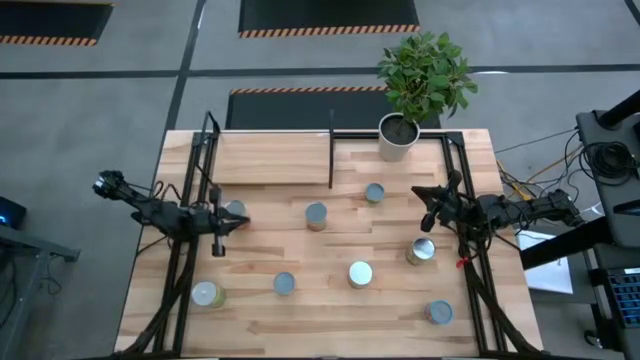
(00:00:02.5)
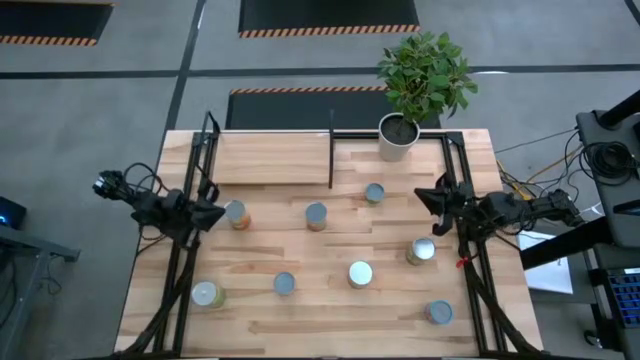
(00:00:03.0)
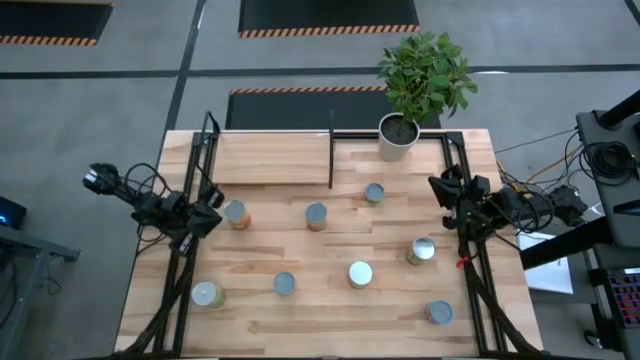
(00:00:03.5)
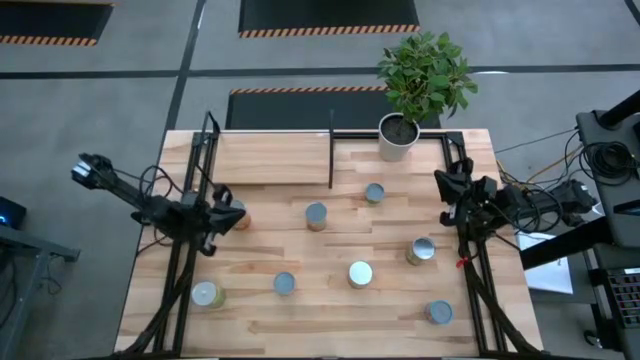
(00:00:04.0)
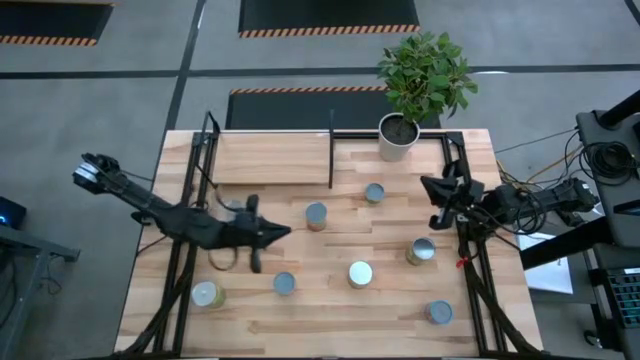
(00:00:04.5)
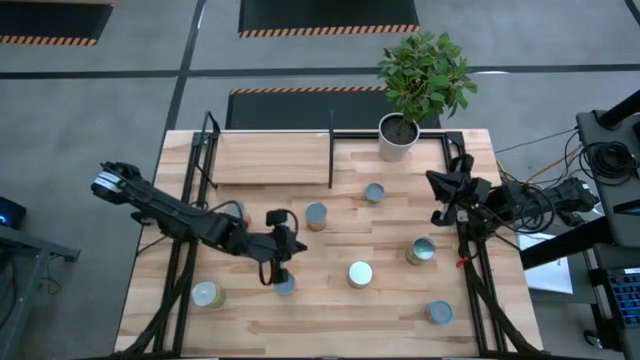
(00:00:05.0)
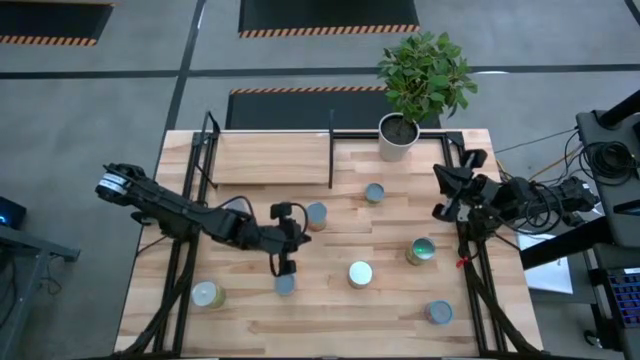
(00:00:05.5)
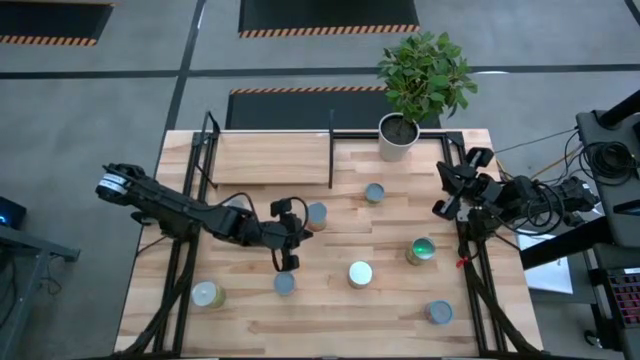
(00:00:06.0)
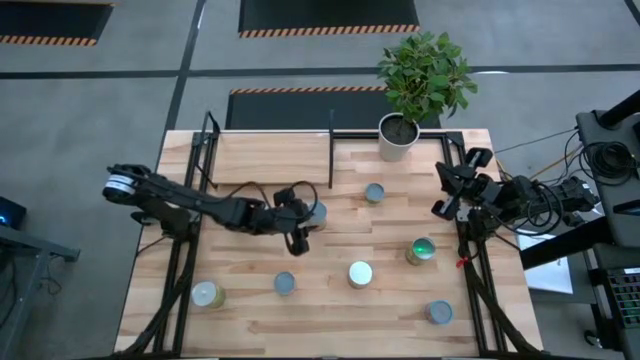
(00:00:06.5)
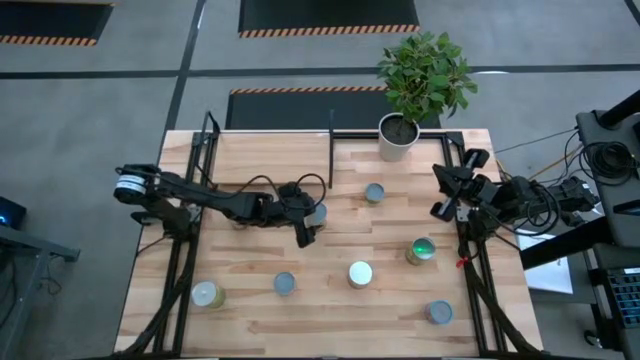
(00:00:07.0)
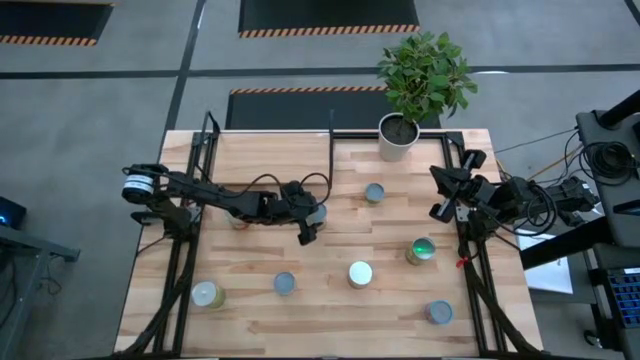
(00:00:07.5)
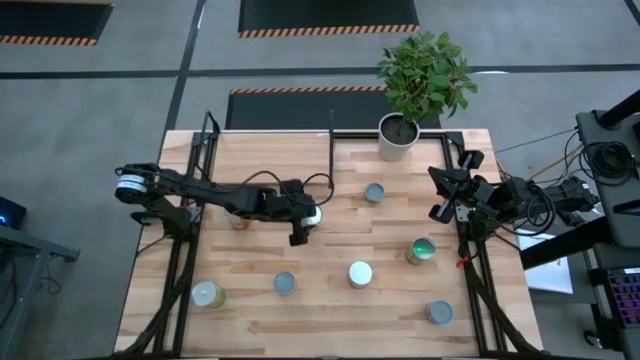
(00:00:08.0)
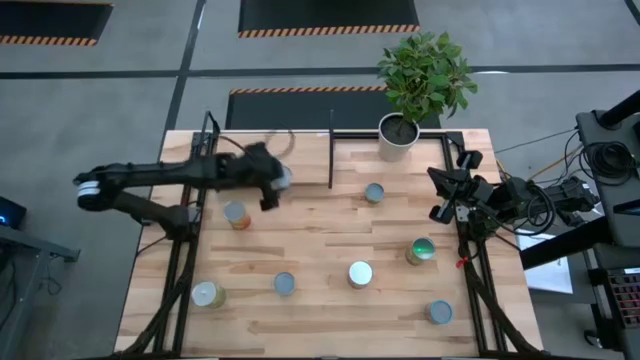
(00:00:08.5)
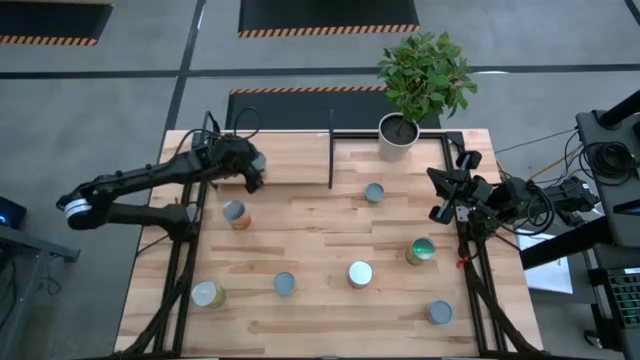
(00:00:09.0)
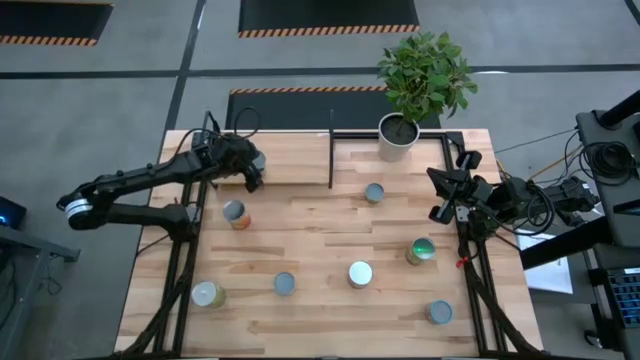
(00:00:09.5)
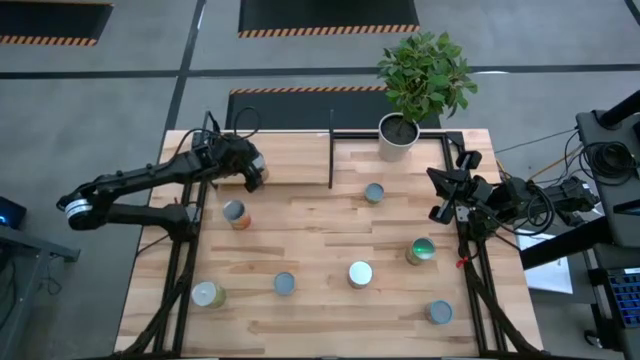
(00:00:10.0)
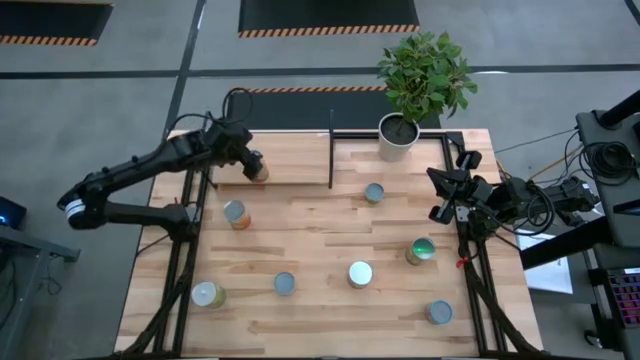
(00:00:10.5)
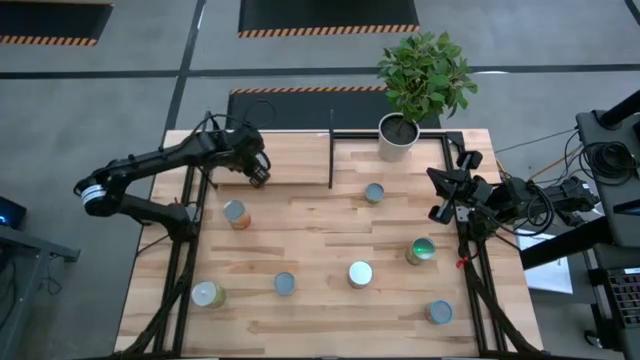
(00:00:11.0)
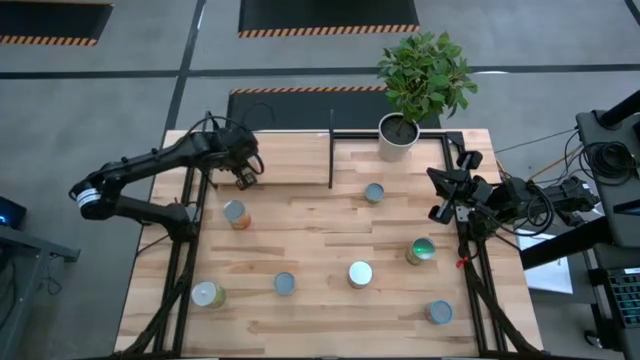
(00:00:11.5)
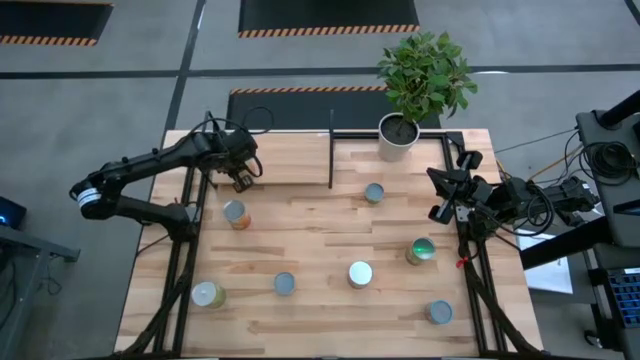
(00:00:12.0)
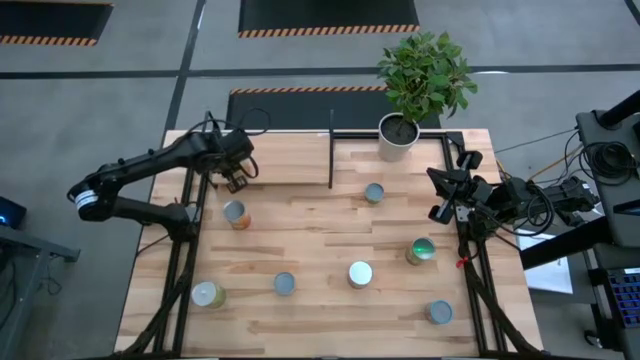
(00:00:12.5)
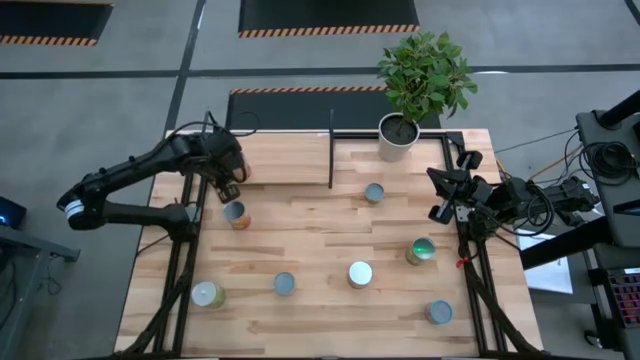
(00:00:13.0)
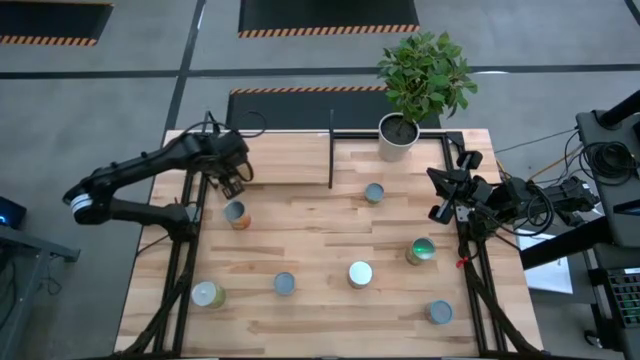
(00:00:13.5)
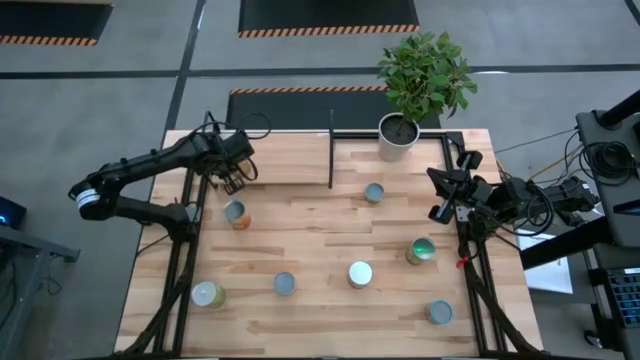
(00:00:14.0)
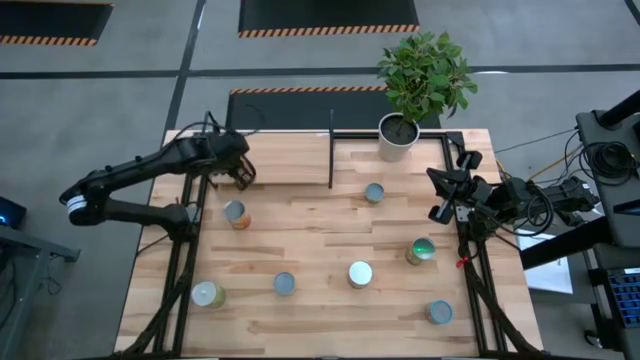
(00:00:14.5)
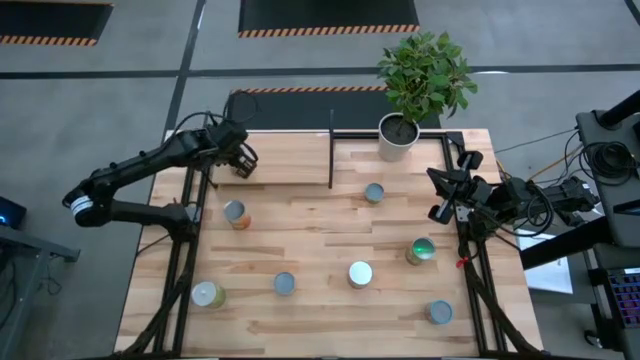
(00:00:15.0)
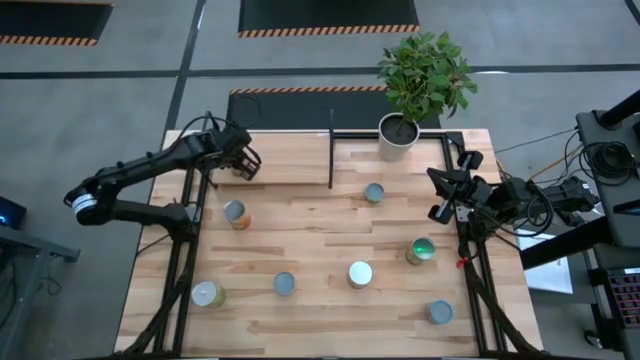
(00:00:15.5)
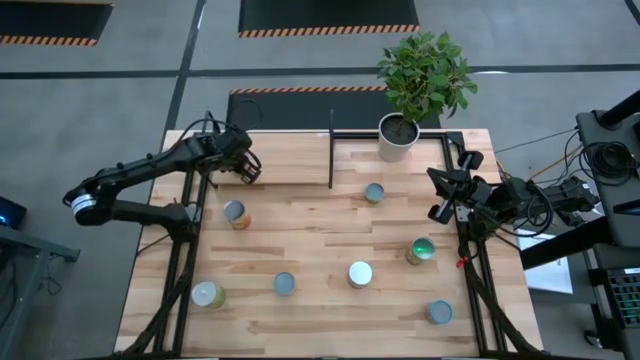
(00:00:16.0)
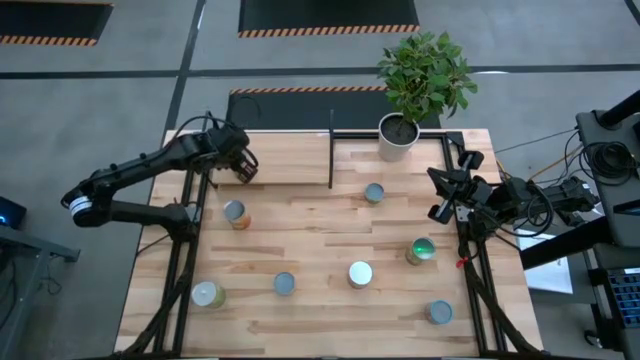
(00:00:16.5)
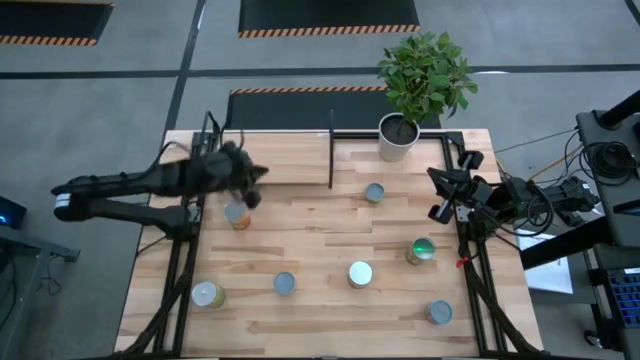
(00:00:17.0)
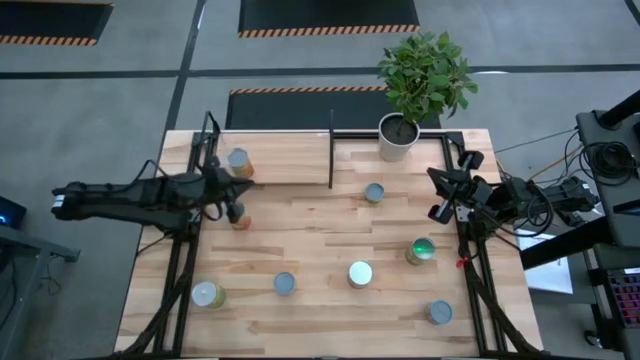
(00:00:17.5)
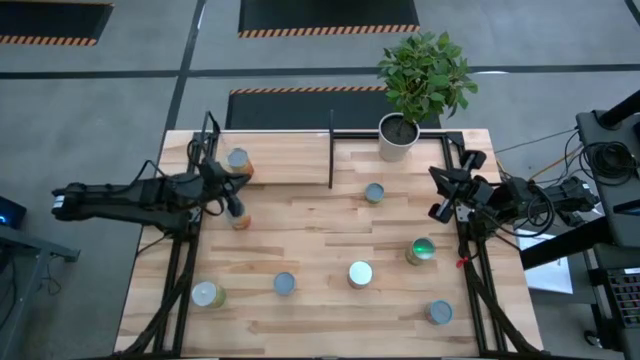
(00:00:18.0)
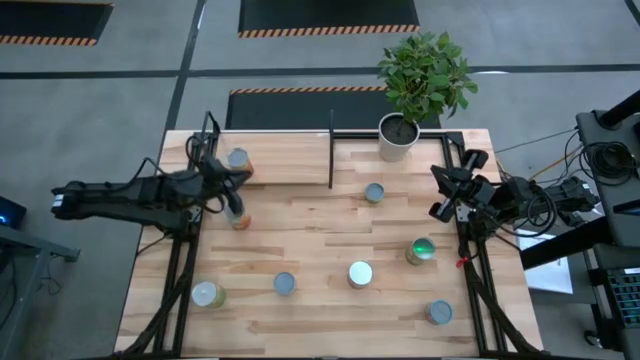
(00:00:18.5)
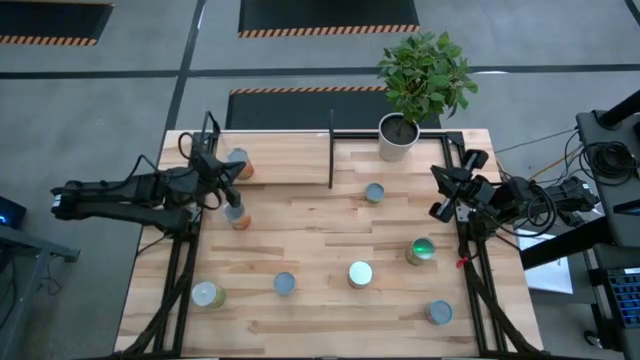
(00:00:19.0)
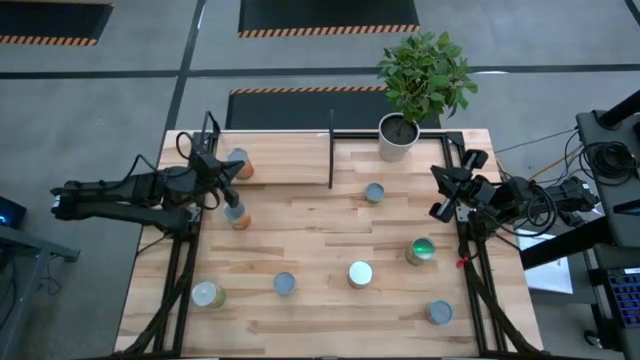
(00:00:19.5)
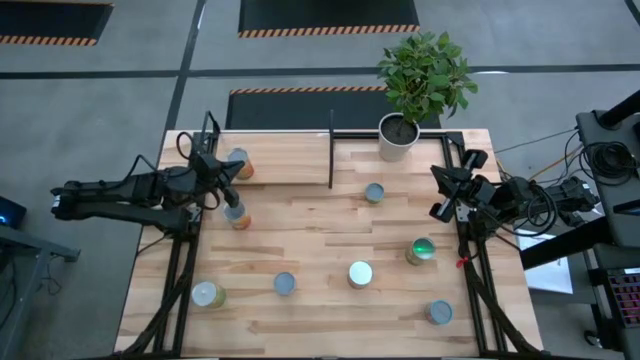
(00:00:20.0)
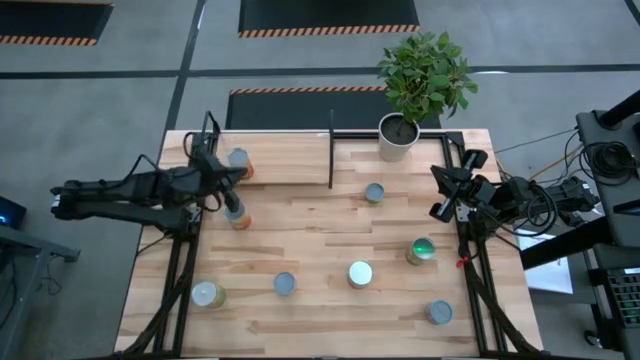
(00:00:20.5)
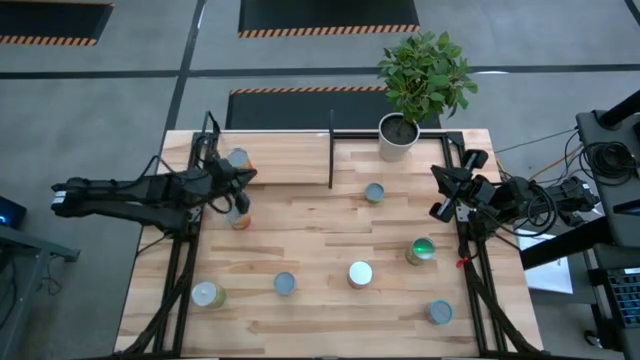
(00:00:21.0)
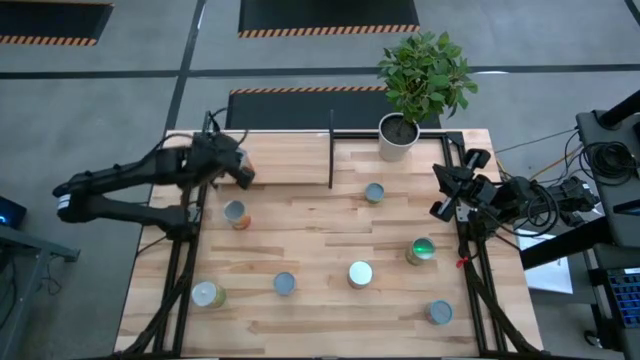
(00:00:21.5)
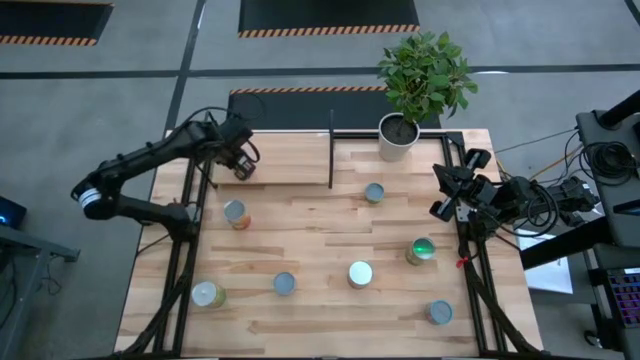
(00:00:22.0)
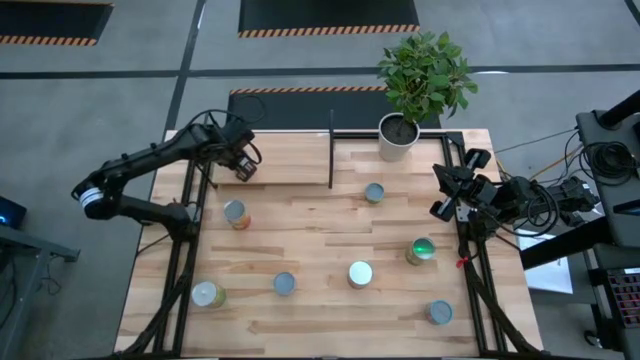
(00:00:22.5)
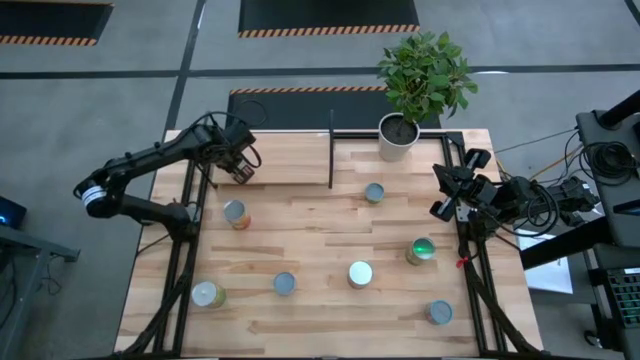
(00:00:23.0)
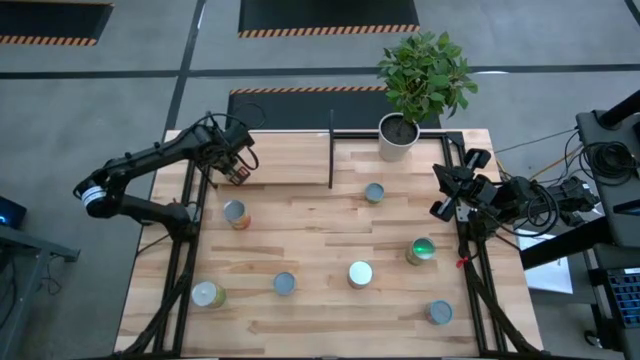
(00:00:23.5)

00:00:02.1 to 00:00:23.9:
Task: Pick and place cans onto a shelf
Put the orange green beans can on the shelf
